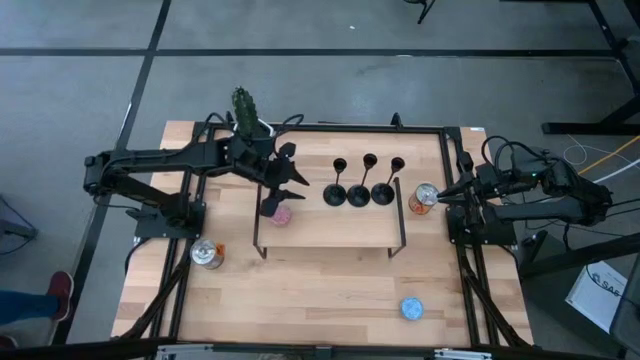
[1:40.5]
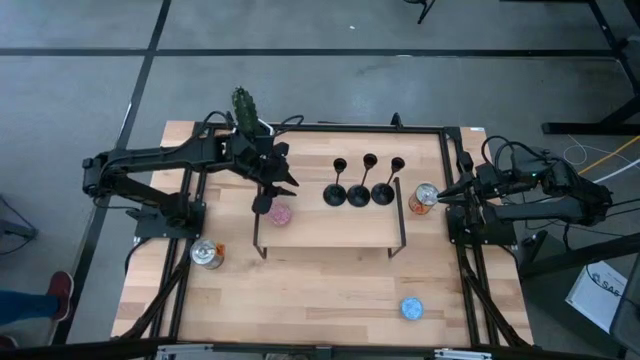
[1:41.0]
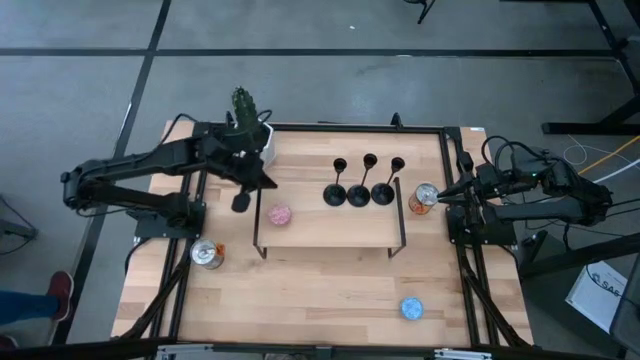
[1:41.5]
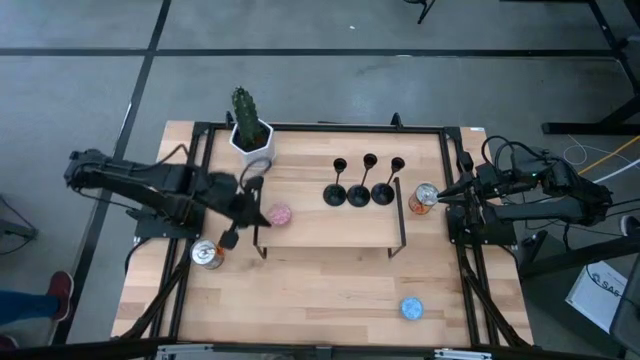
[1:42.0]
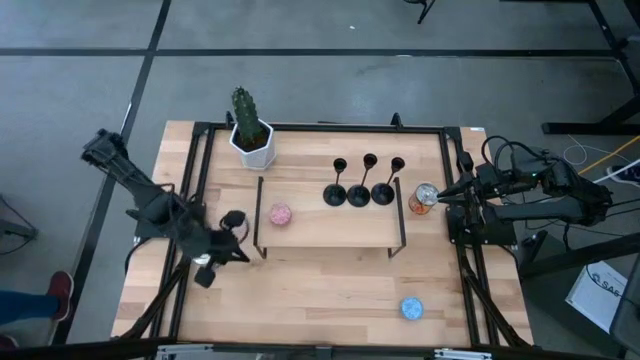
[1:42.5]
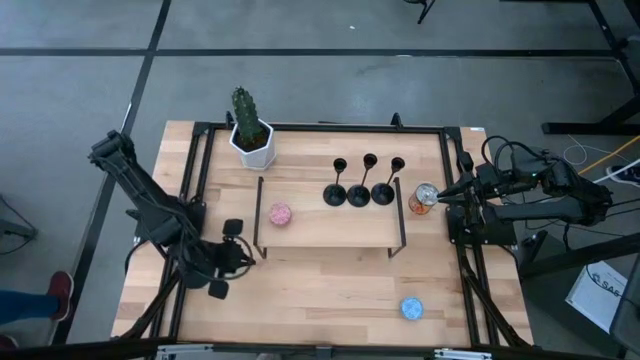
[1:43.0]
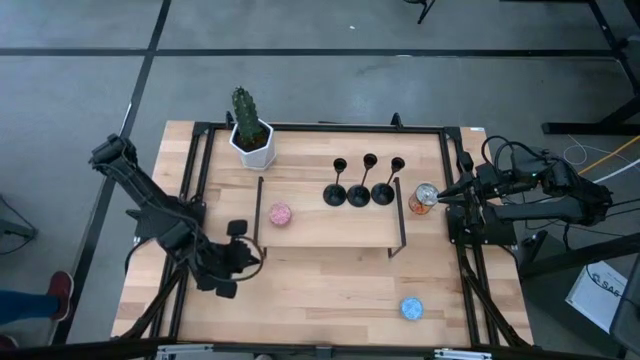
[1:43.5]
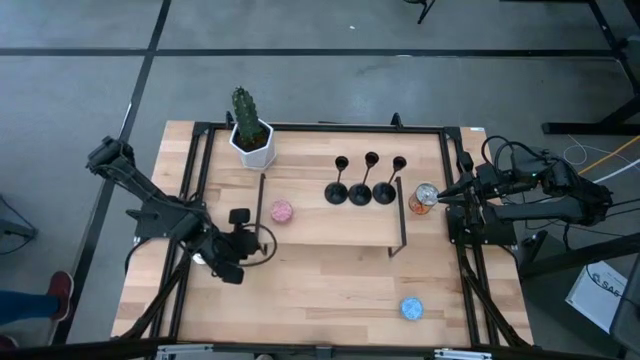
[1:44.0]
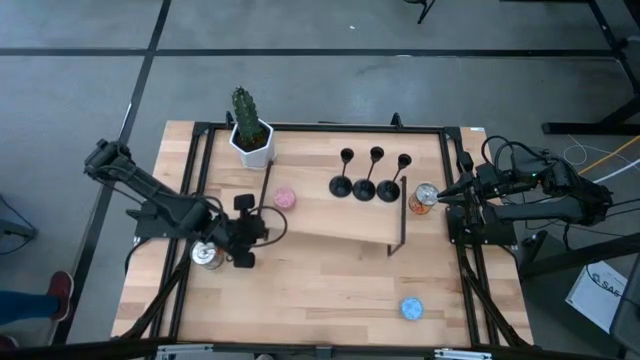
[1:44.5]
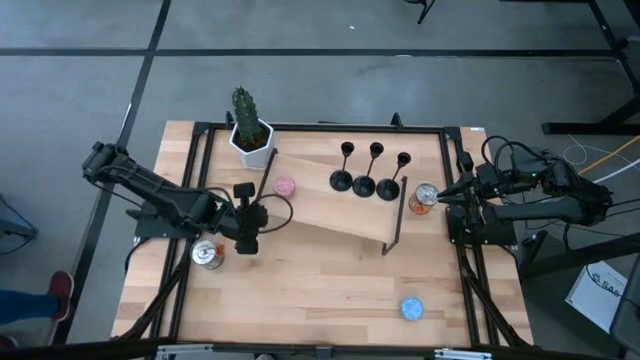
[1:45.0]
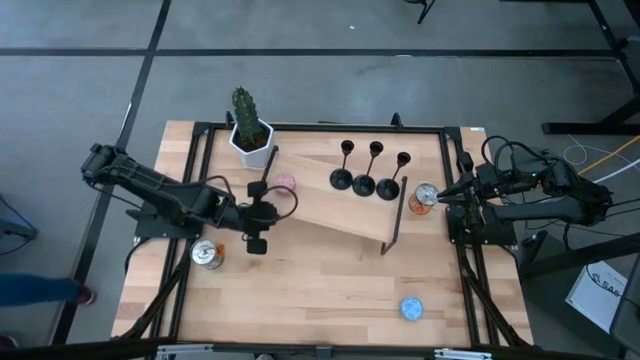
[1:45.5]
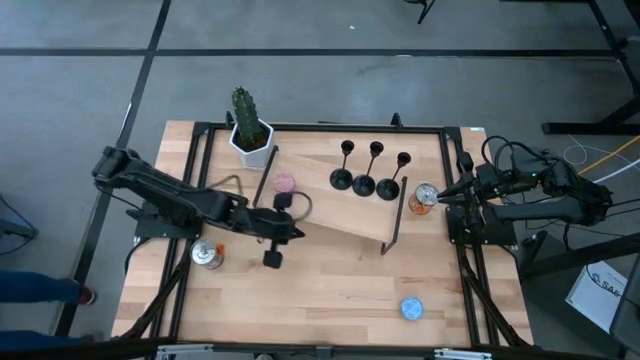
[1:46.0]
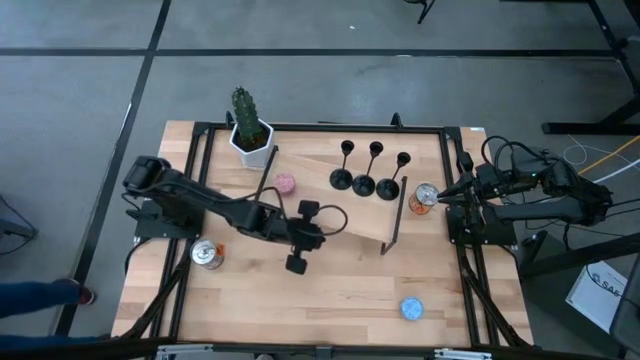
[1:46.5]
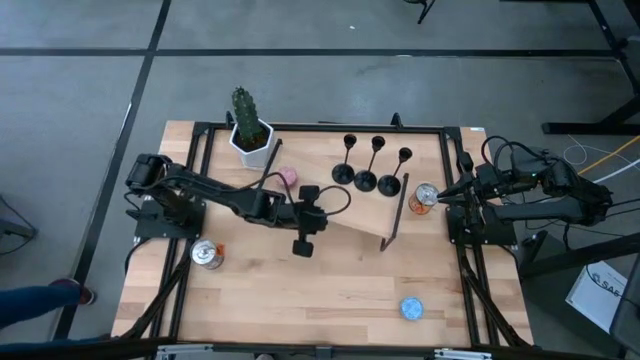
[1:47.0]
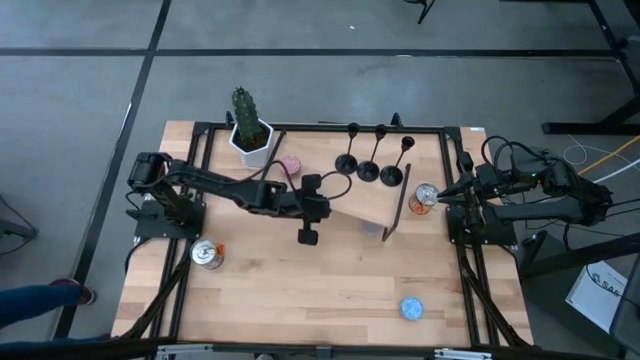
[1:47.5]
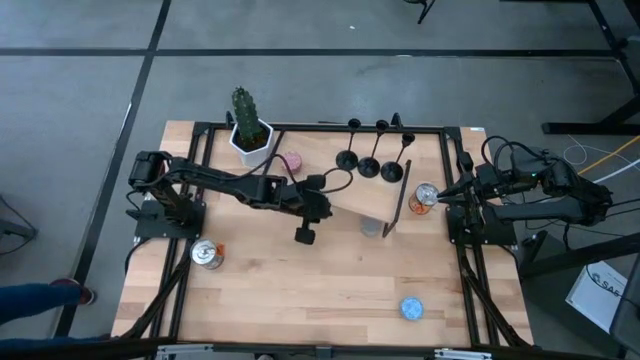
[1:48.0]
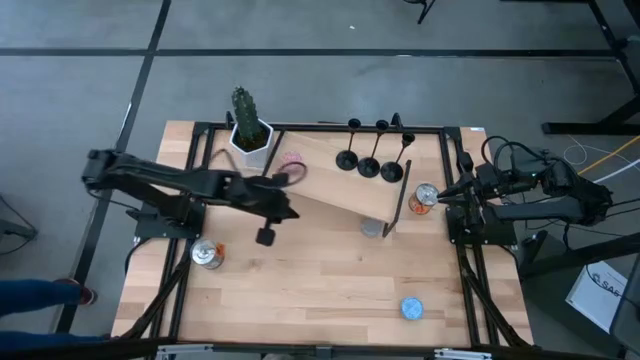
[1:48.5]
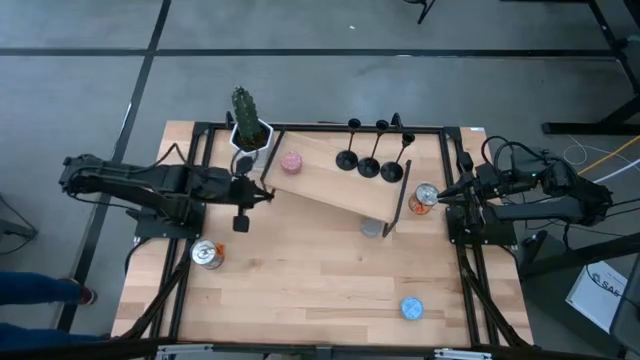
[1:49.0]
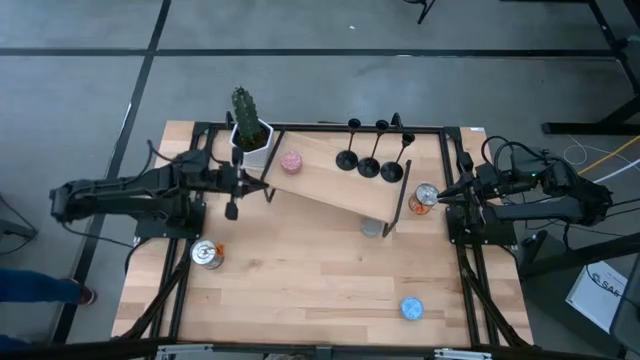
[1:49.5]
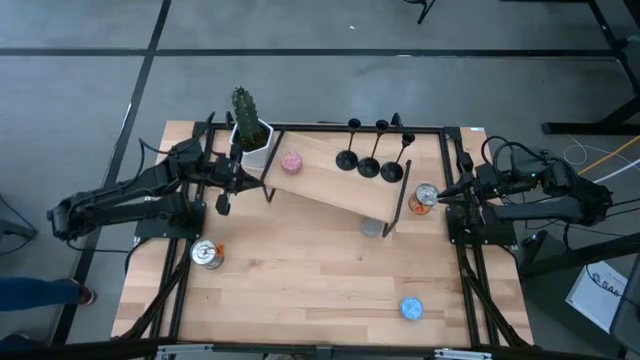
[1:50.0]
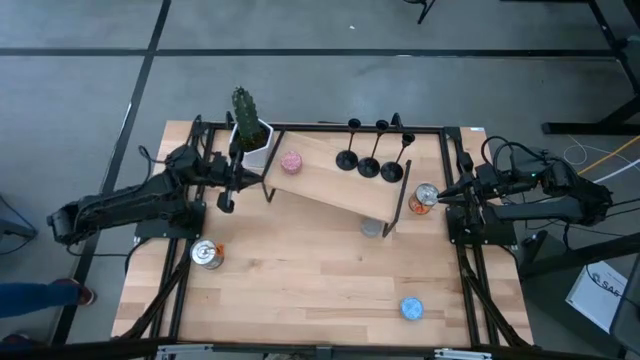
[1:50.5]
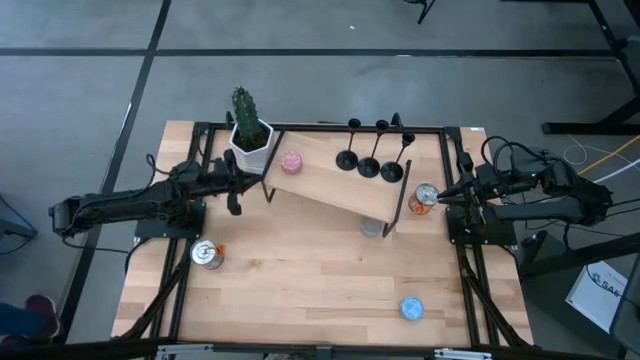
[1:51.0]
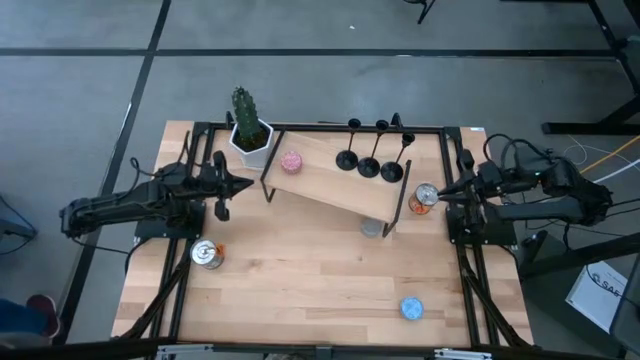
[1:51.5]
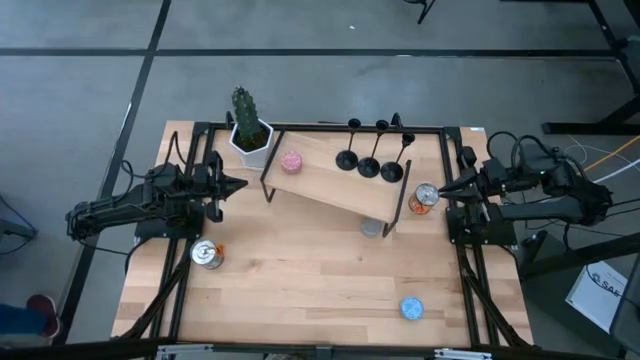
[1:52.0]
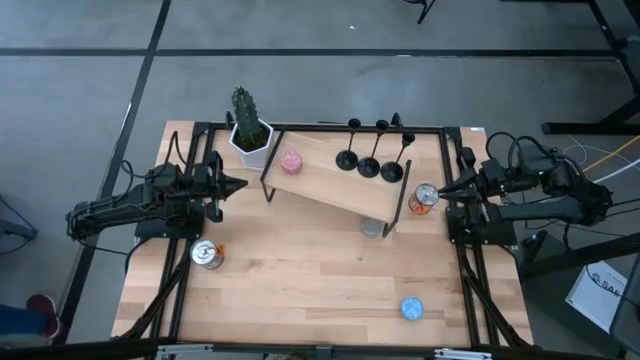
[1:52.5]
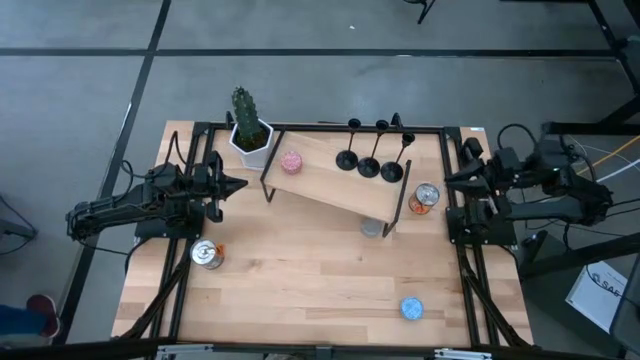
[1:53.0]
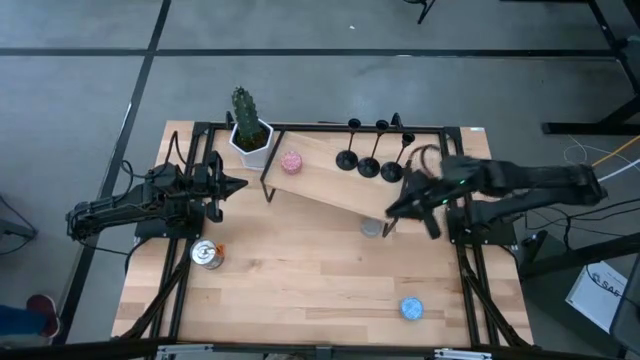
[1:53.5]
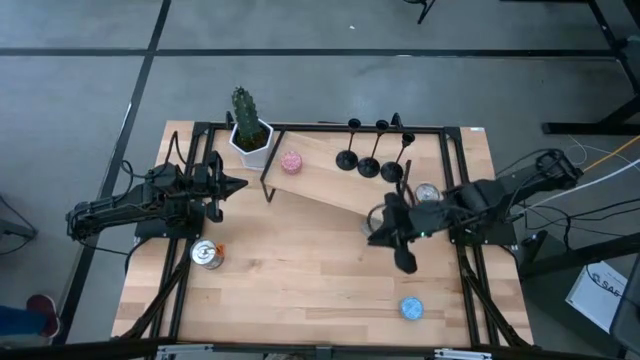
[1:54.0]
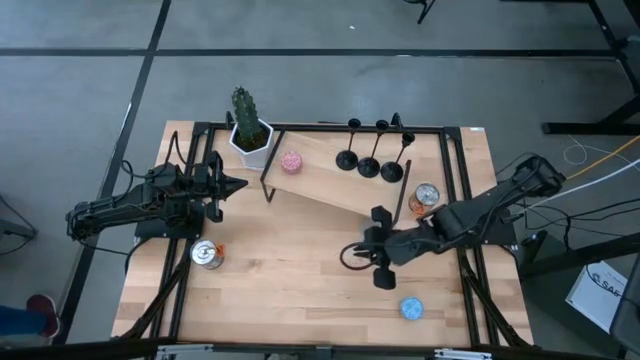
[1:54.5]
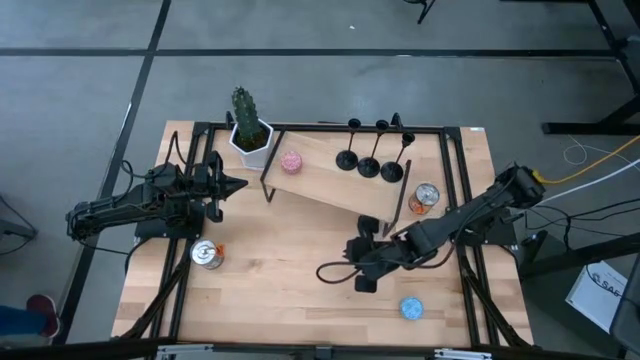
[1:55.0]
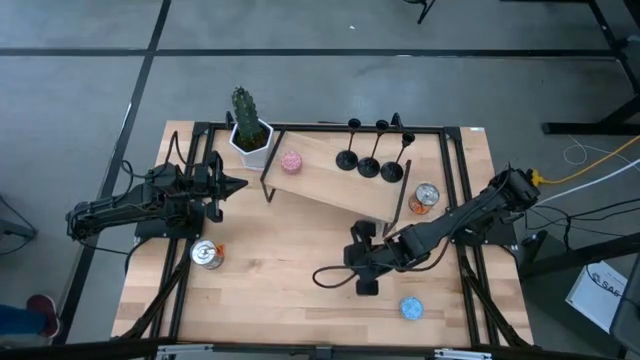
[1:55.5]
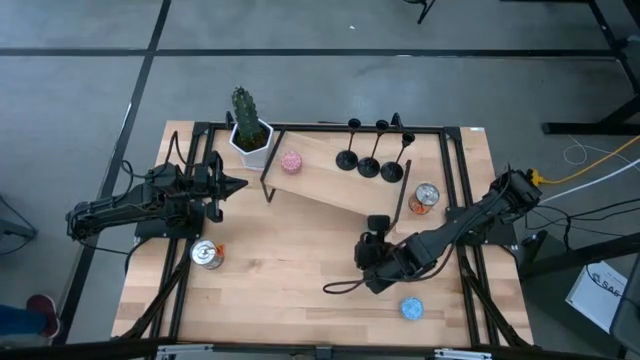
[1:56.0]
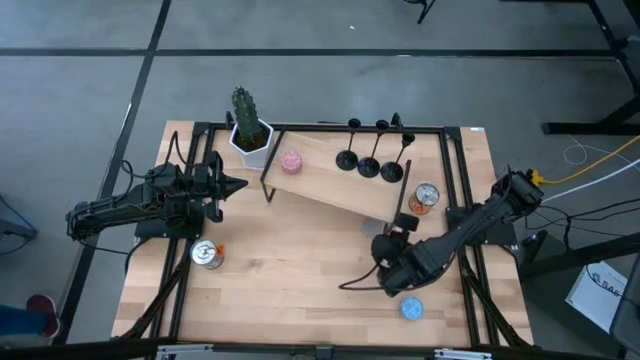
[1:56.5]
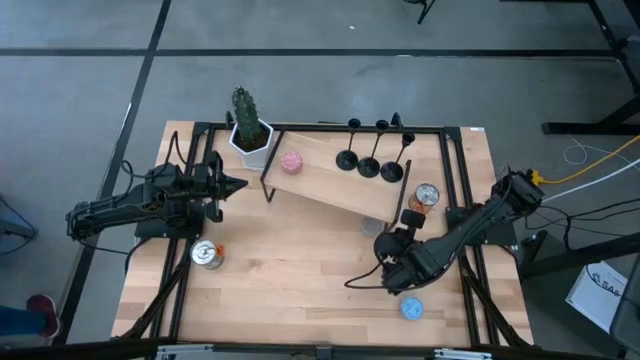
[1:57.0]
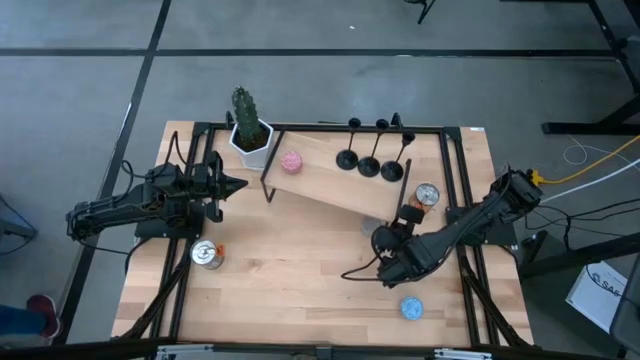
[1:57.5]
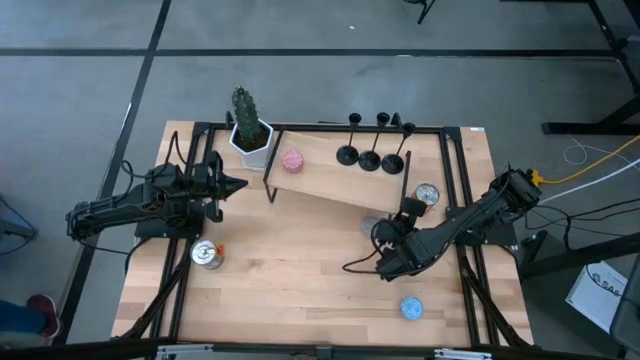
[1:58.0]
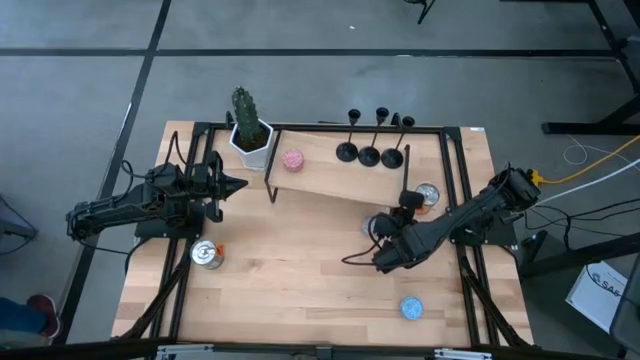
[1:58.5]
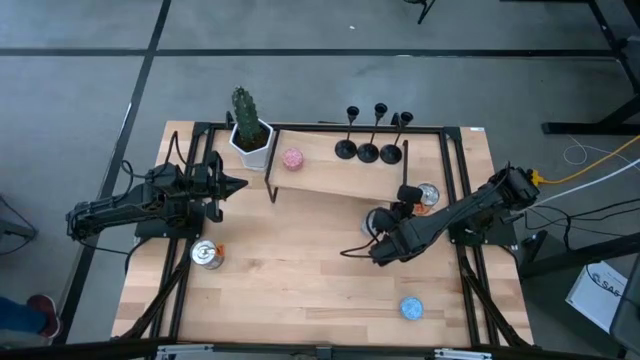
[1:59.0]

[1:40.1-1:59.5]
Task: Pick & Place candle stick holders
Move the shelf to the top of the table

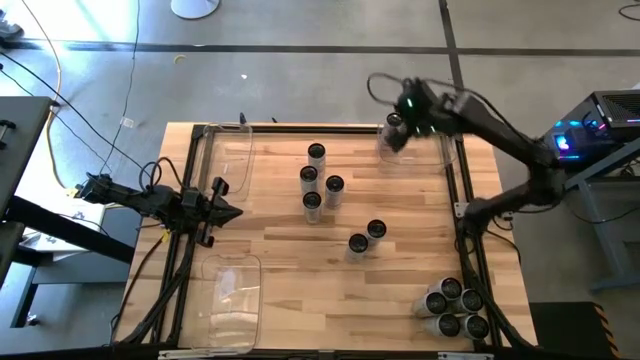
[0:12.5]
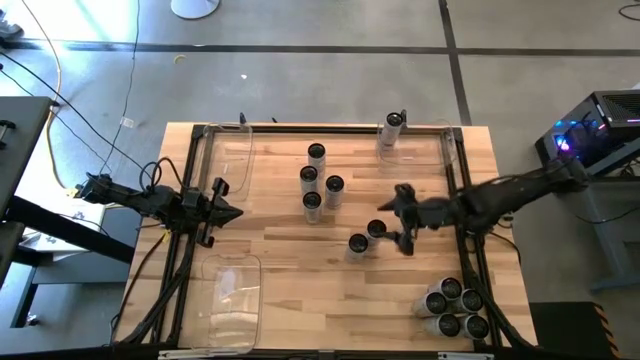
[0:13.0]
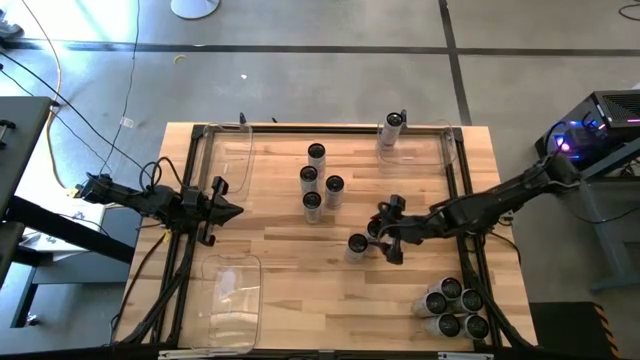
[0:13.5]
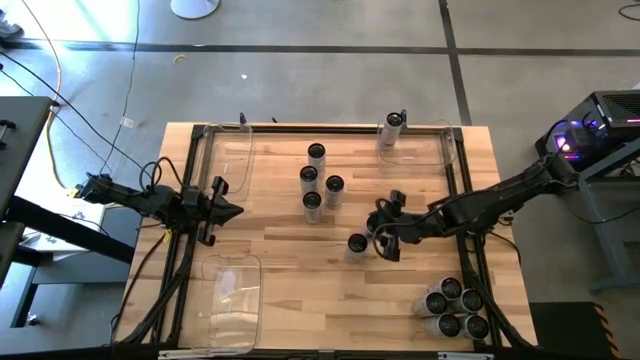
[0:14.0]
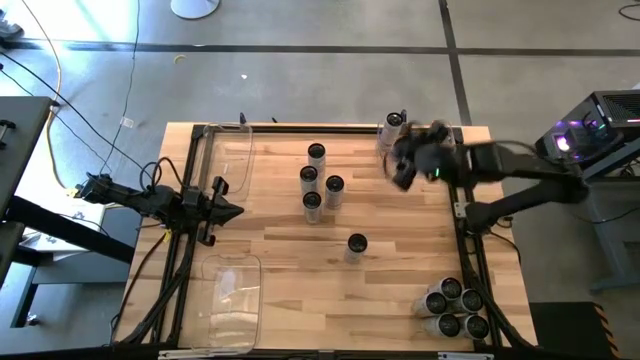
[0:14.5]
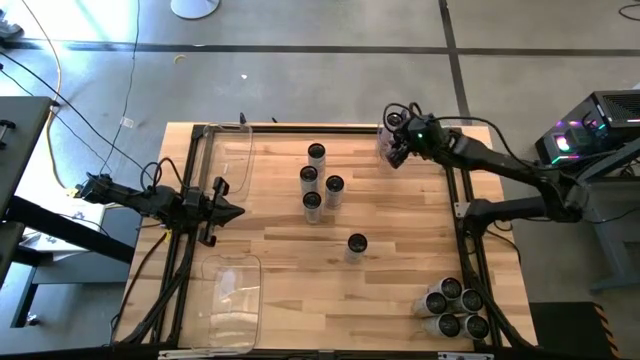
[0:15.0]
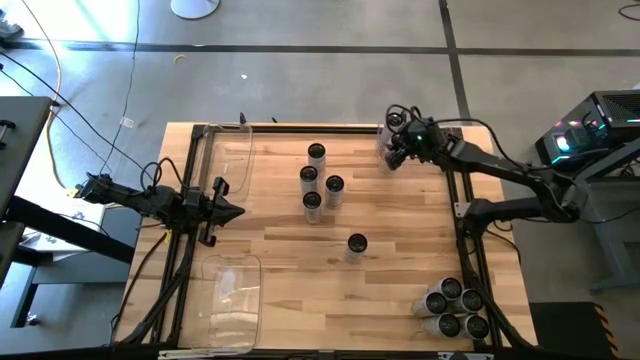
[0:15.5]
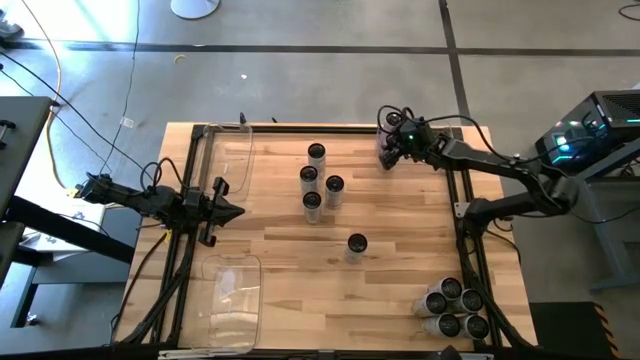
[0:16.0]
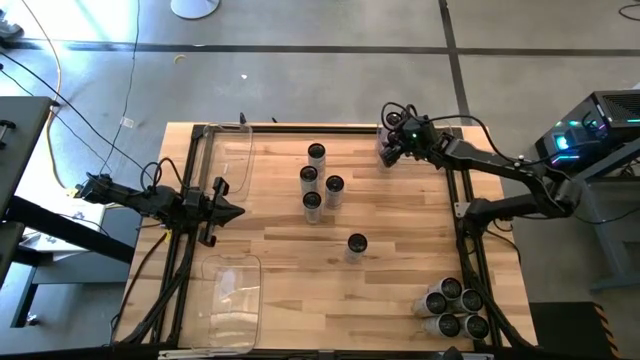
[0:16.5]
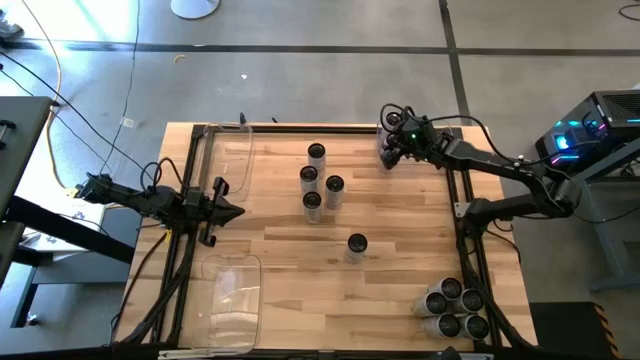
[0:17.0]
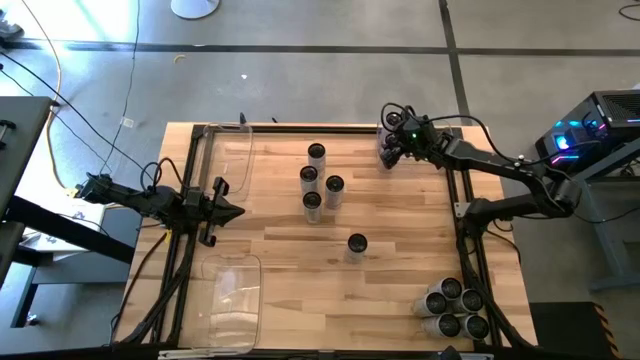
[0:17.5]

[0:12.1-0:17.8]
Task: Sort soda cans
Put the white pink soda can into the top right transparent bin
